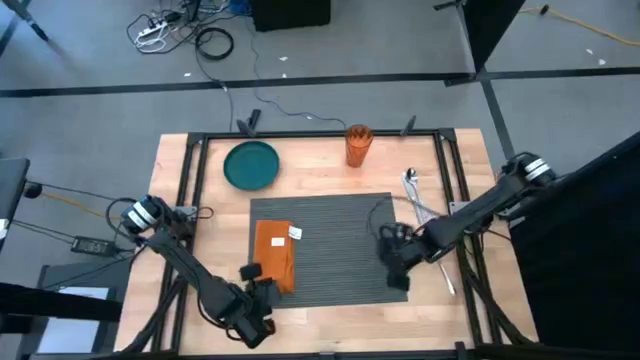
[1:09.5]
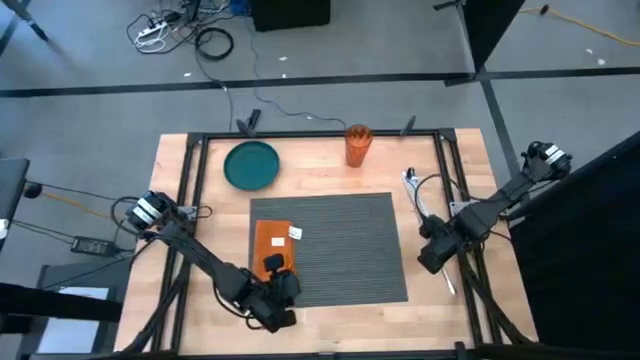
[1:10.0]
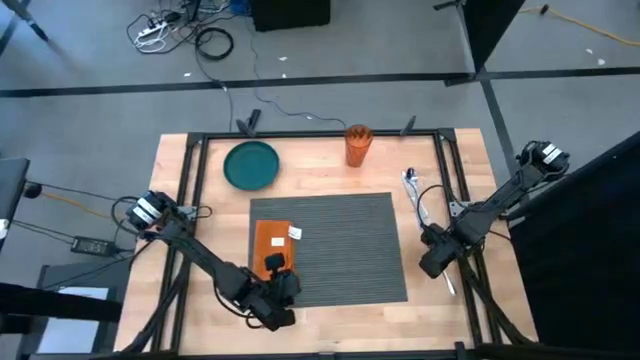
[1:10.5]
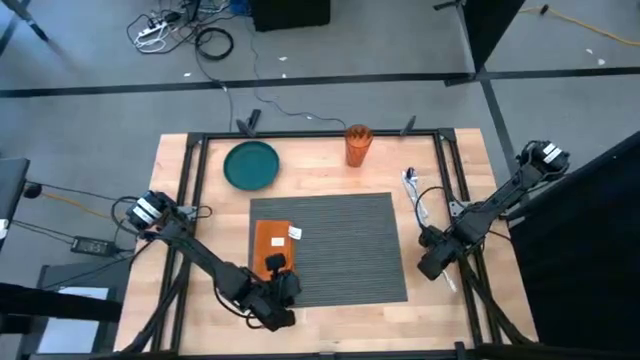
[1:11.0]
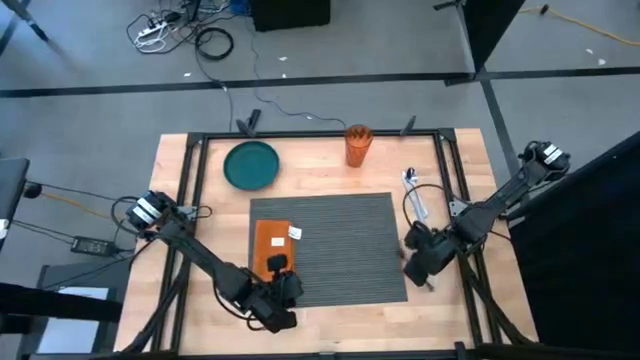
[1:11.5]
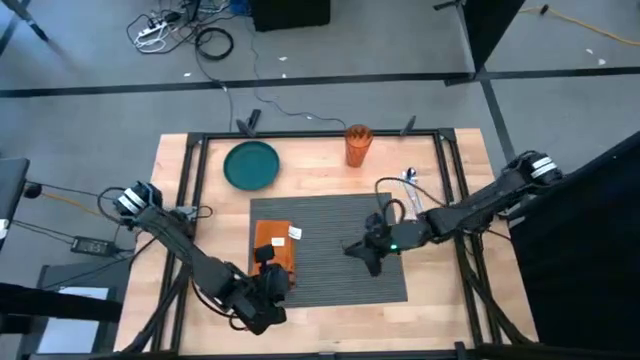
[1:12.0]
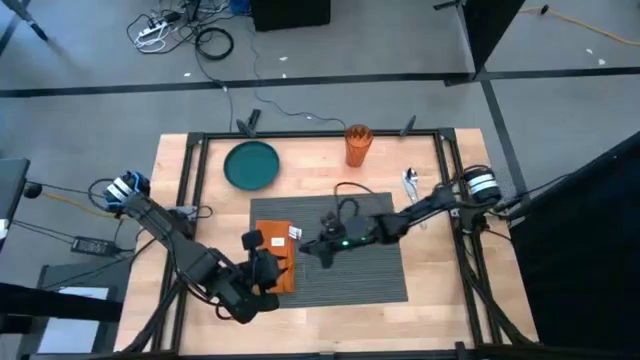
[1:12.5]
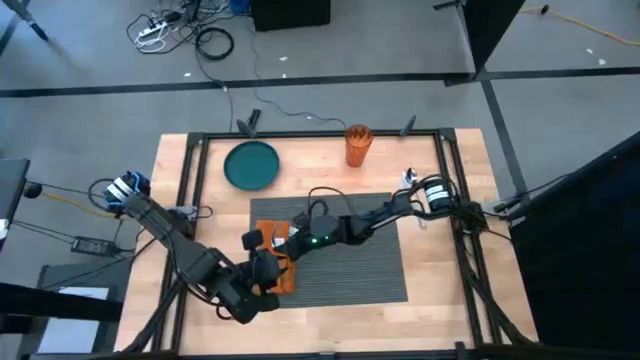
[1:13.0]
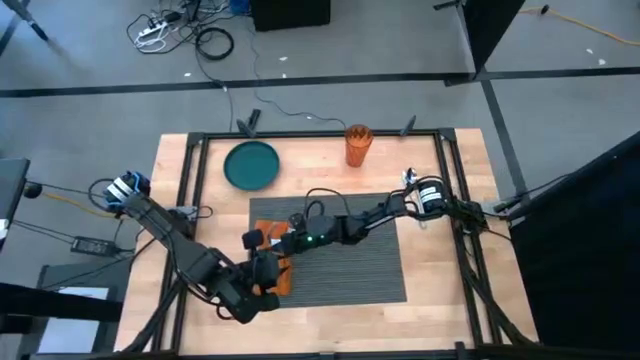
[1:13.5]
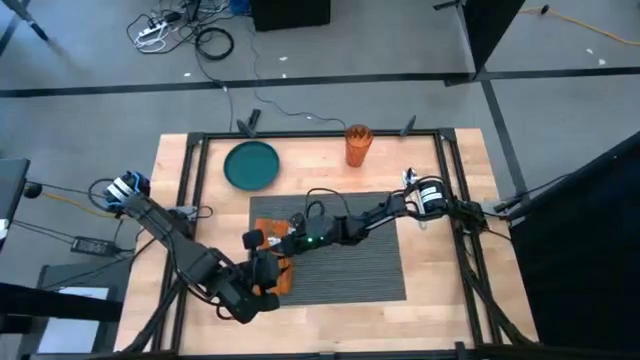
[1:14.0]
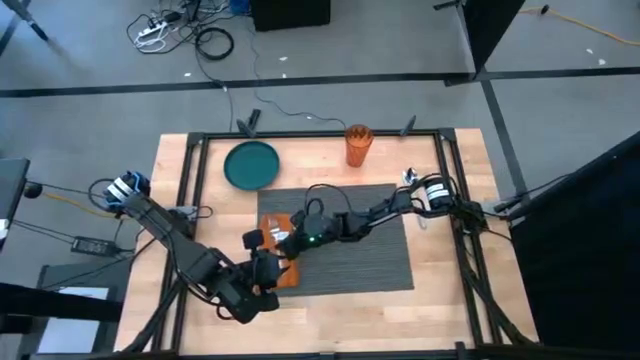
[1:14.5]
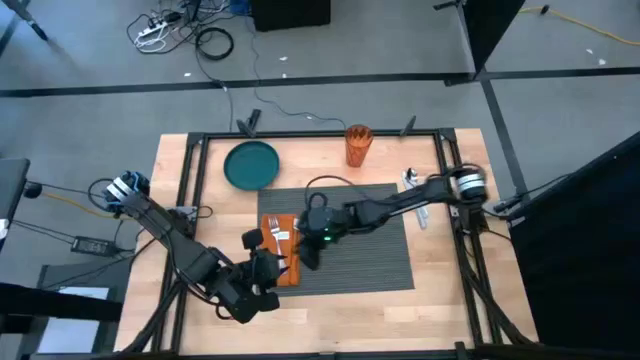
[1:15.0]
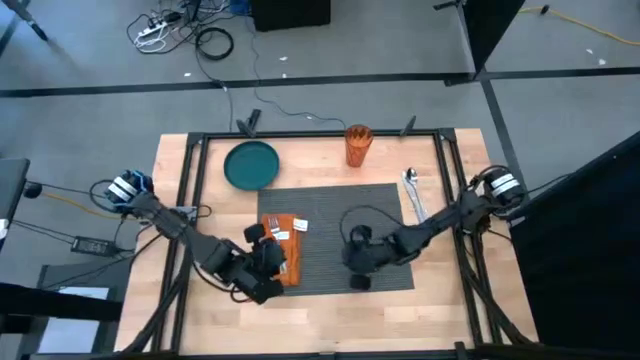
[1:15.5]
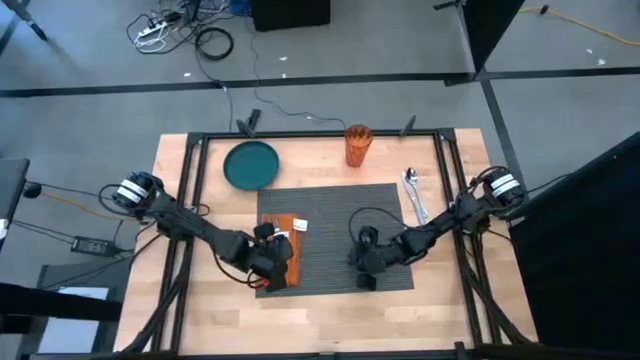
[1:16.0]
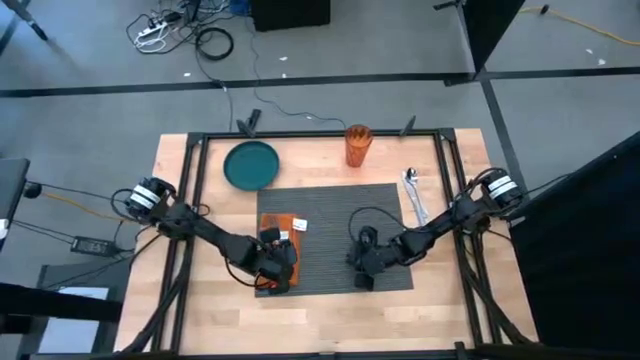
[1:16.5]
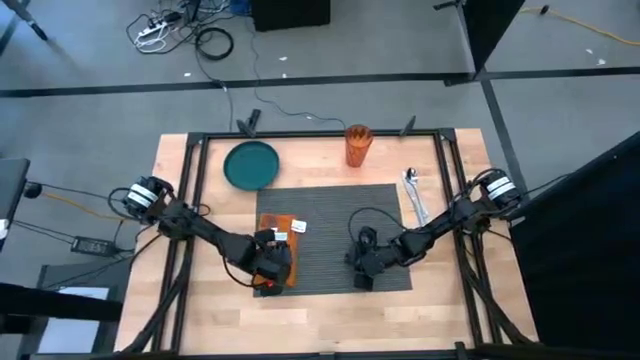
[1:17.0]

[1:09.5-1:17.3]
Task: Set table place
Put the silver fork on top of the orange table napkin

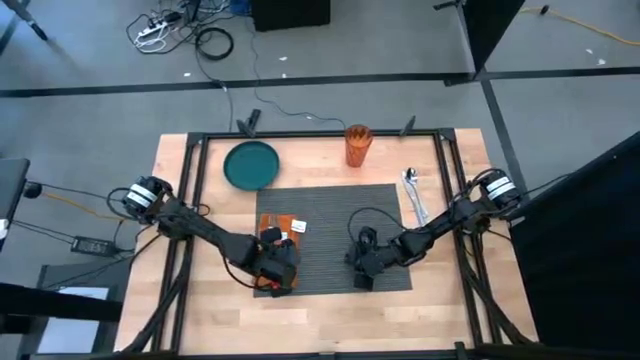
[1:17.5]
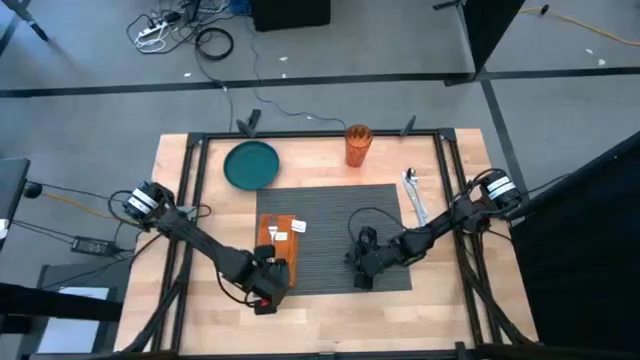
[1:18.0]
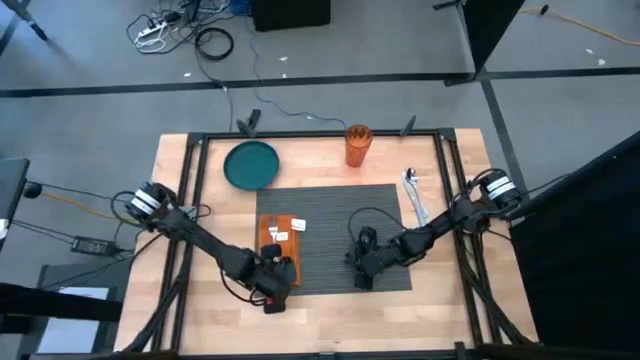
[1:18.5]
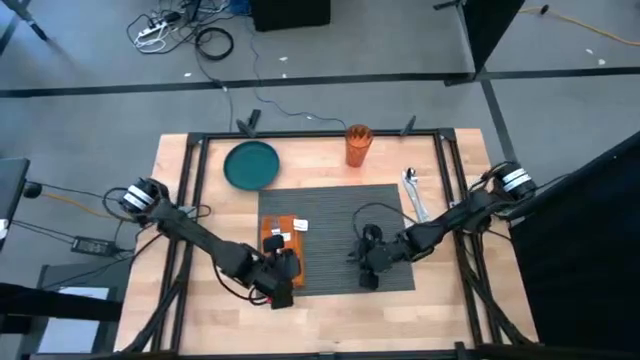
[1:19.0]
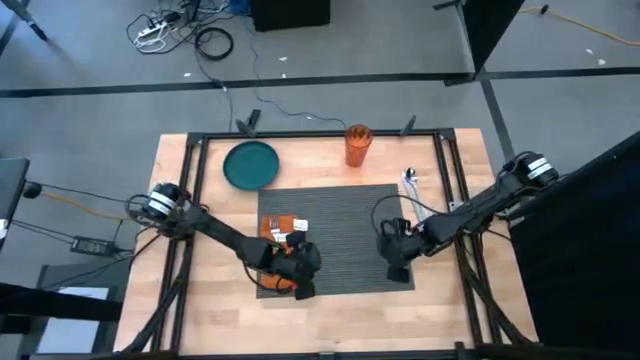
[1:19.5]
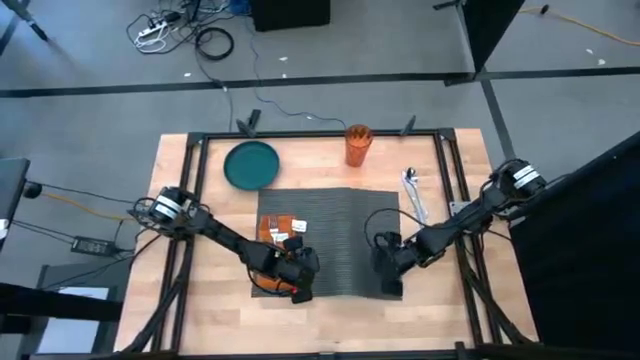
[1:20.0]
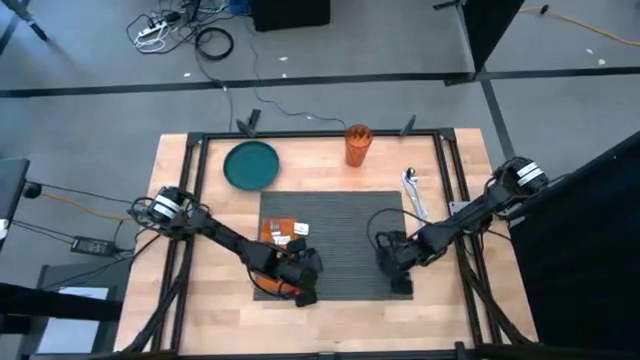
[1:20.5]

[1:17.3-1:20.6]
Adjust the black table placemat

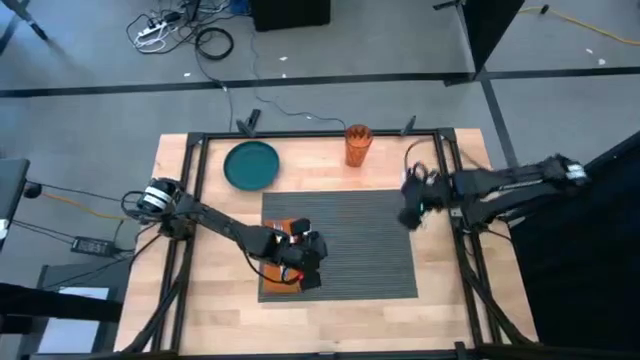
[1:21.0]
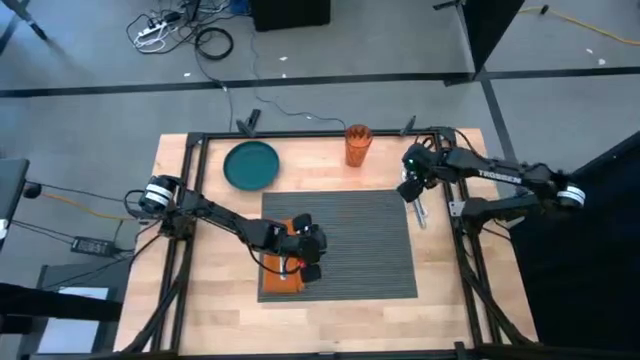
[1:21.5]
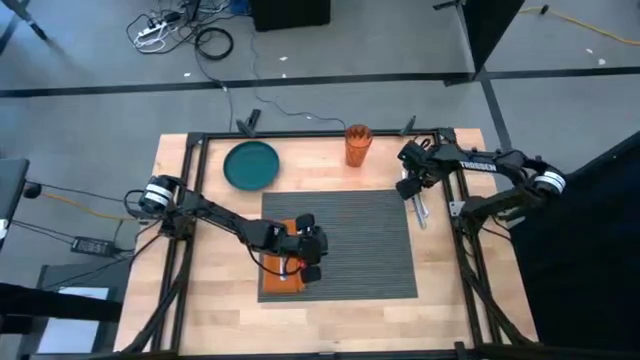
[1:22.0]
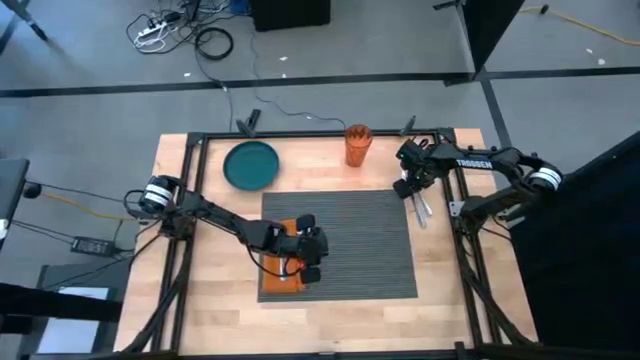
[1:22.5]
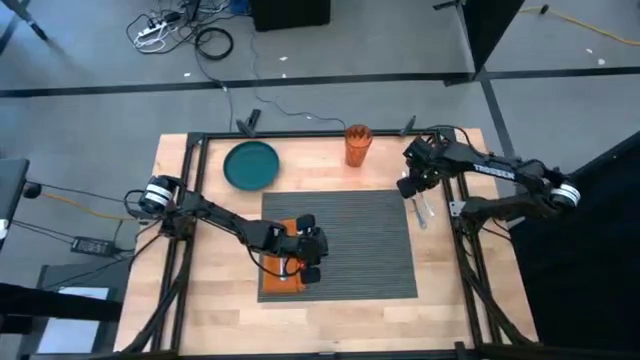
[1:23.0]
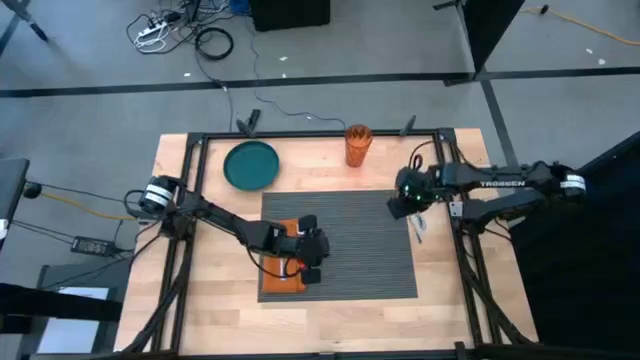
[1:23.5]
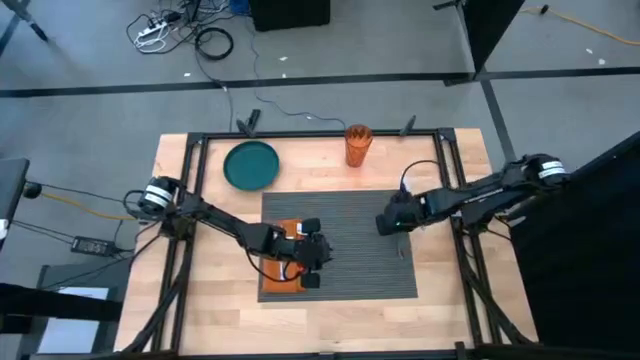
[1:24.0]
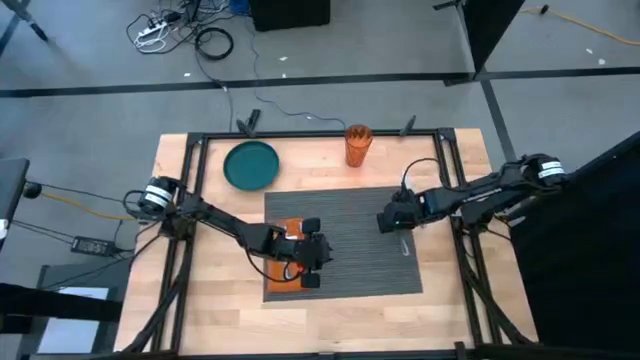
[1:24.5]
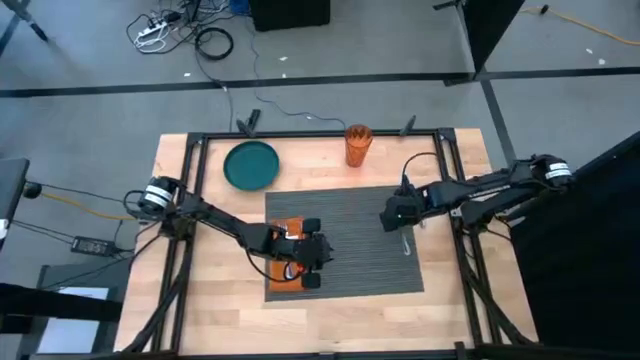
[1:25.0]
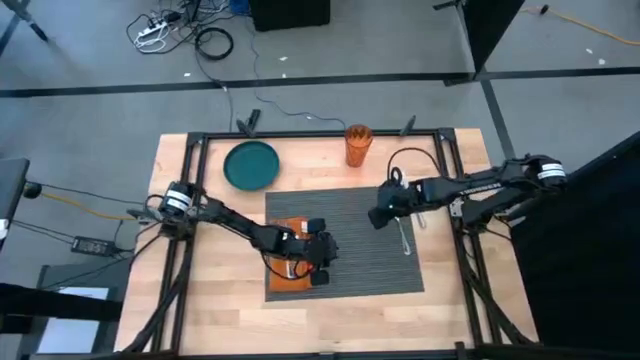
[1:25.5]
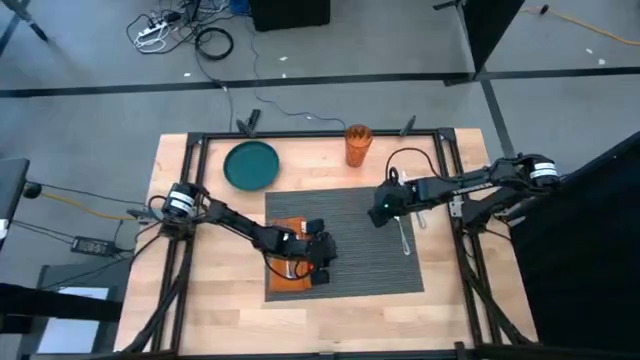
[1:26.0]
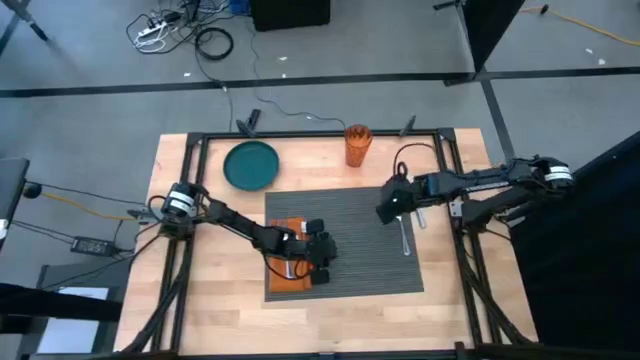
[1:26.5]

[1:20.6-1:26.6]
Put the silver spoon on the middle right of the black table placemat

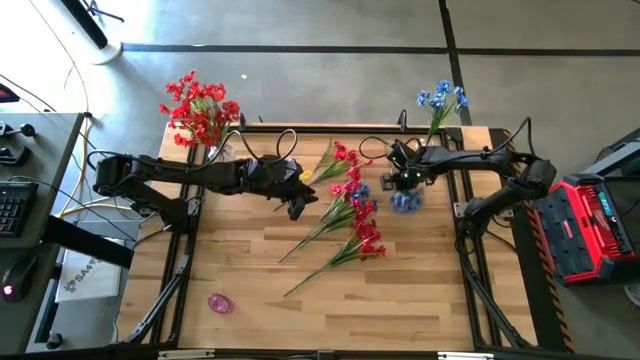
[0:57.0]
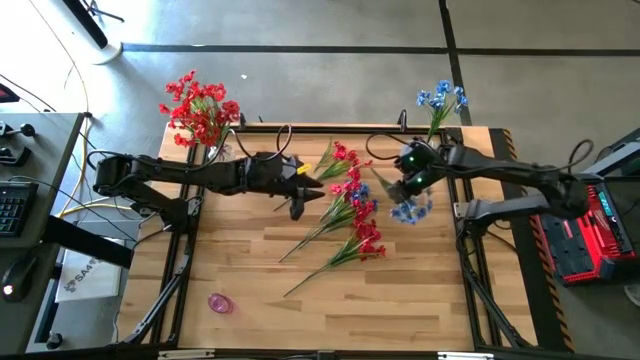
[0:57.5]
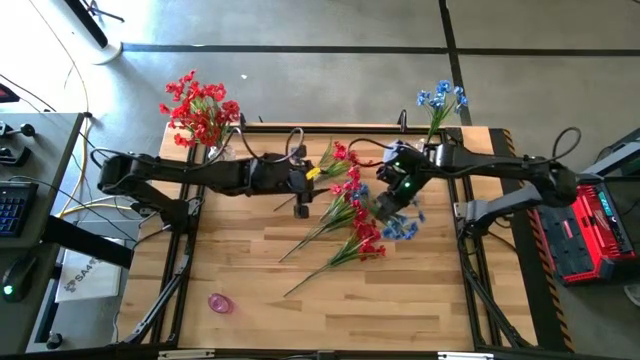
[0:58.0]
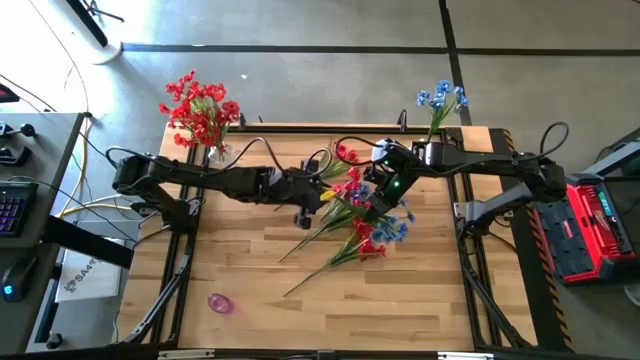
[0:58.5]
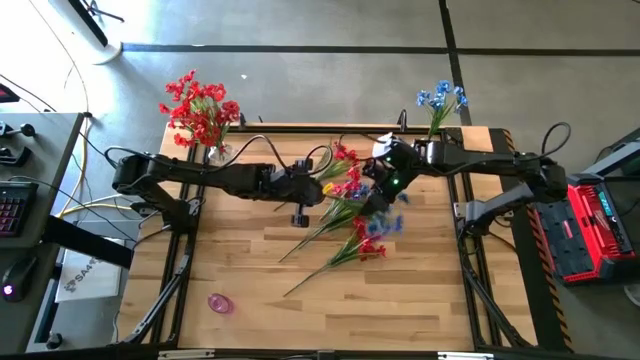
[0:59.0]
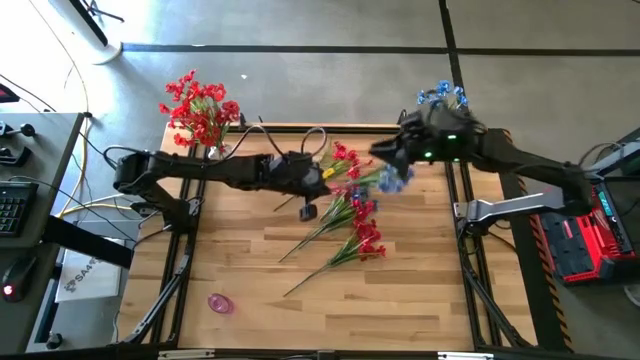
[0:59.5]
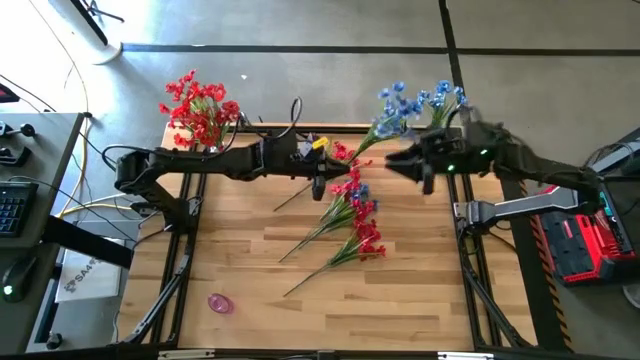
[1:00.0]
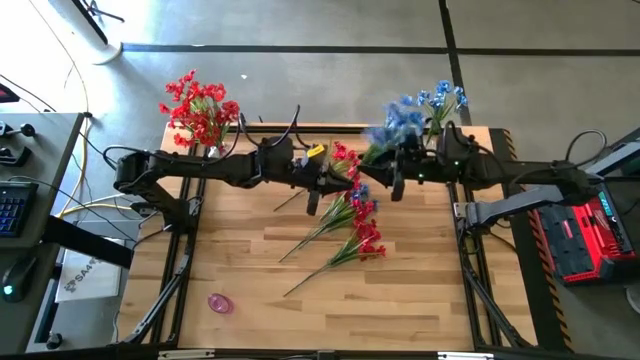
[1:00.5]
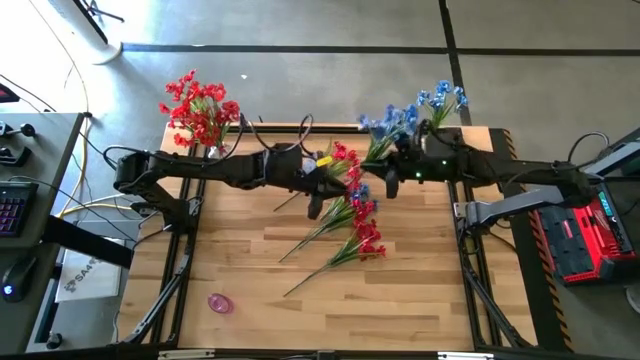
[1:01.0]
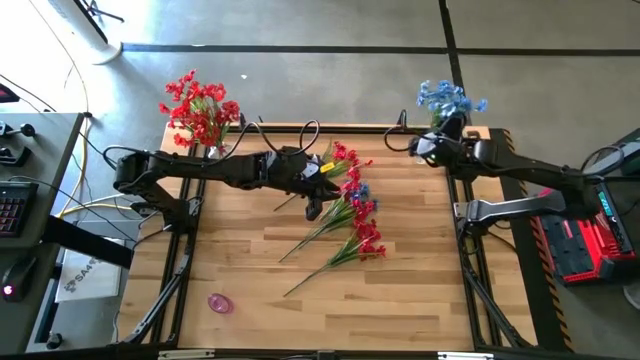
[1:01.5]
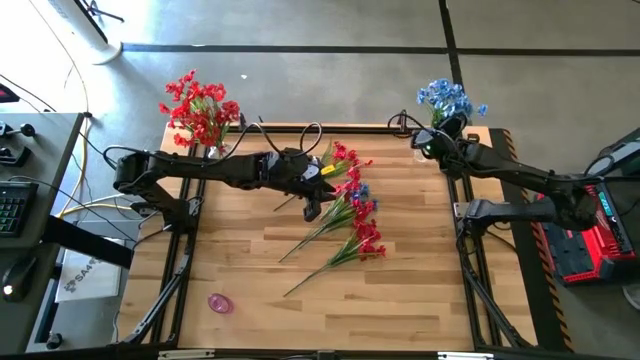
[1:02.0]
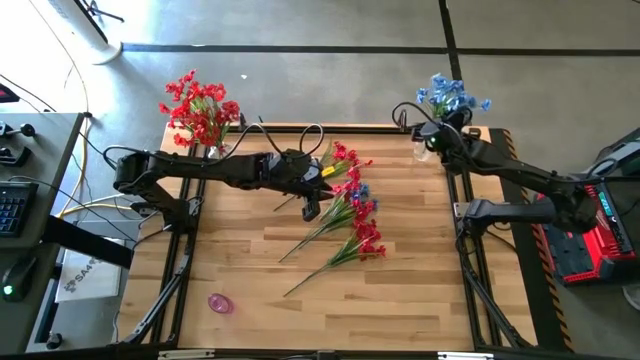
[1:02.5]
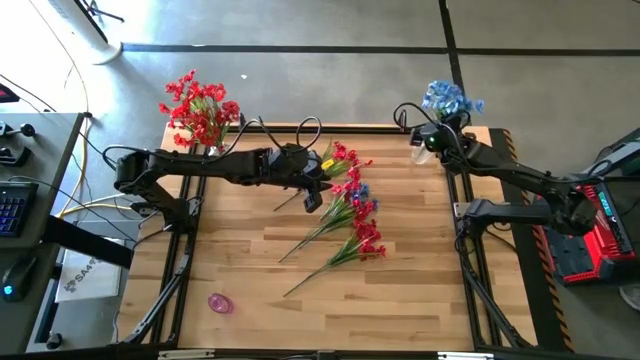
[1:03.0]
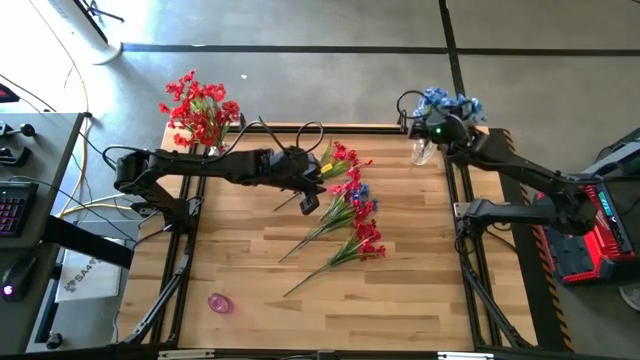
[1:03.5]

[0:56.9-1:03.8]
Task: Sort flowers into vase by color
Put the bottom flower into the right transparent vase
